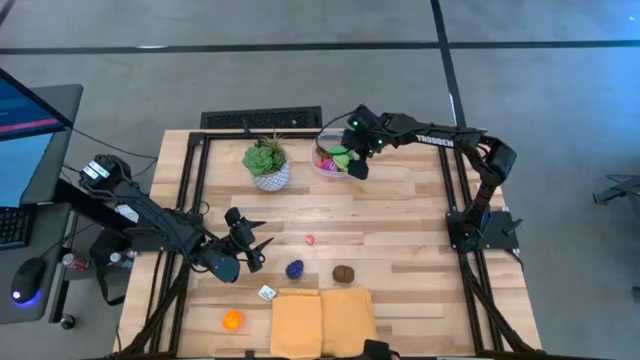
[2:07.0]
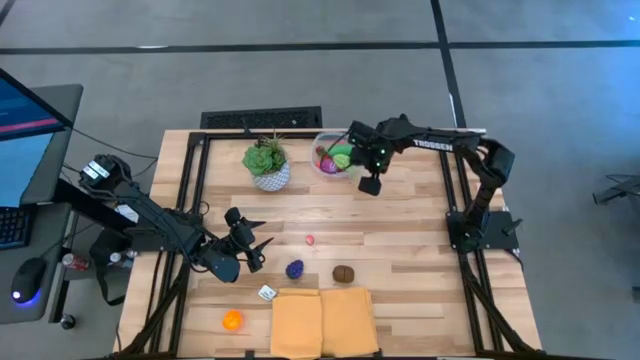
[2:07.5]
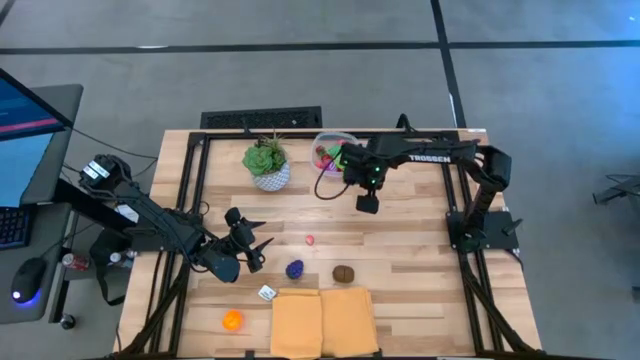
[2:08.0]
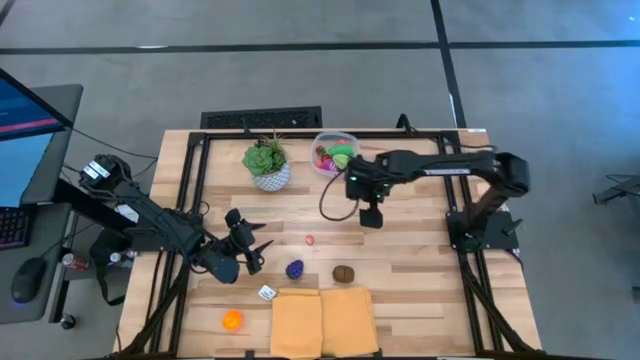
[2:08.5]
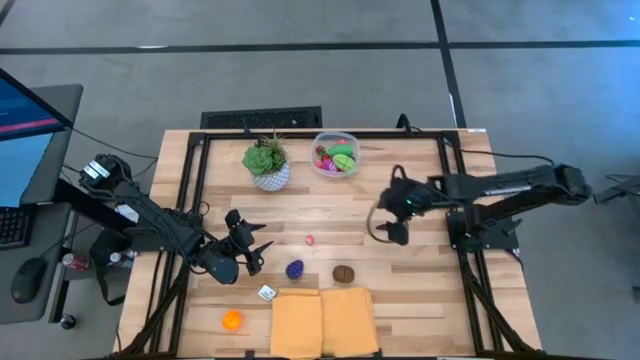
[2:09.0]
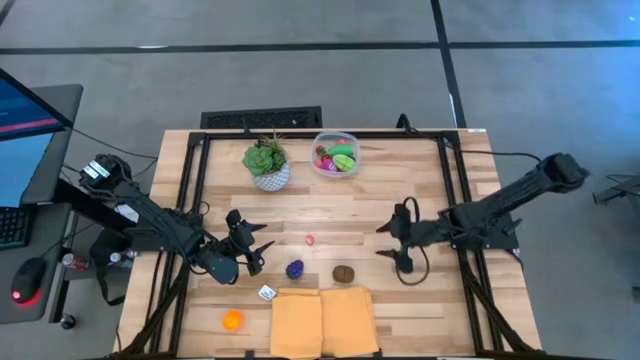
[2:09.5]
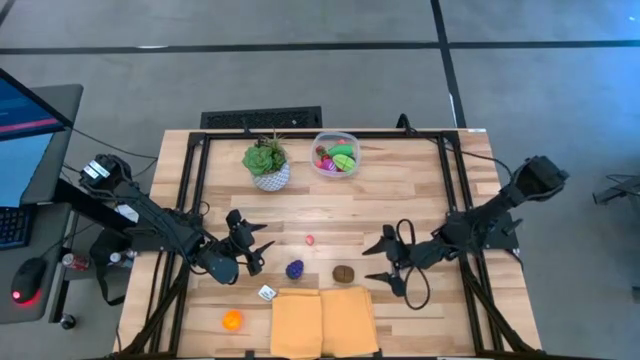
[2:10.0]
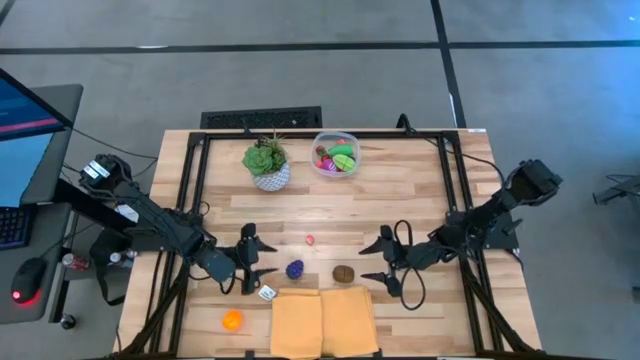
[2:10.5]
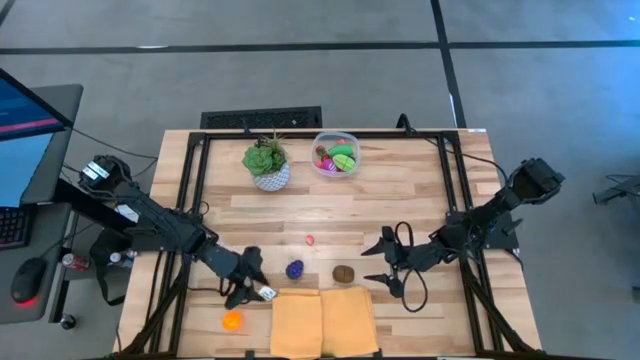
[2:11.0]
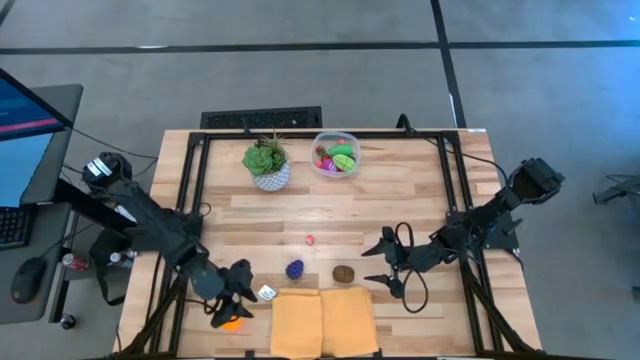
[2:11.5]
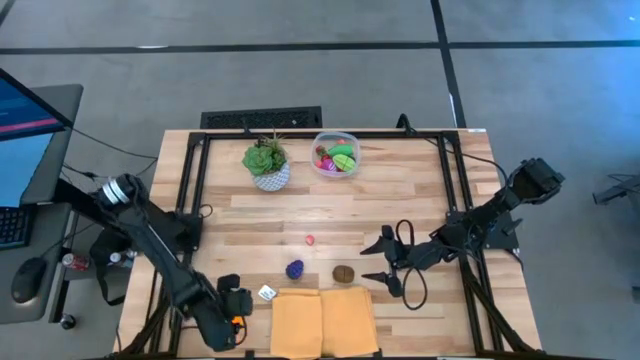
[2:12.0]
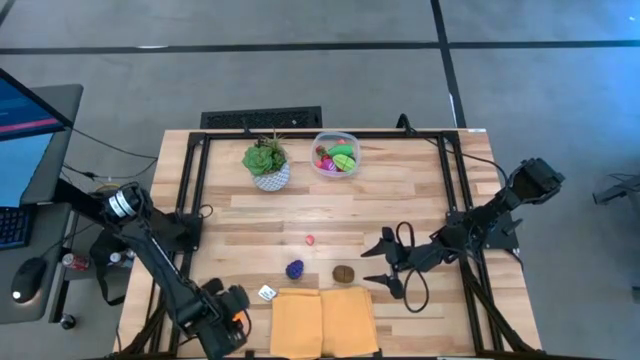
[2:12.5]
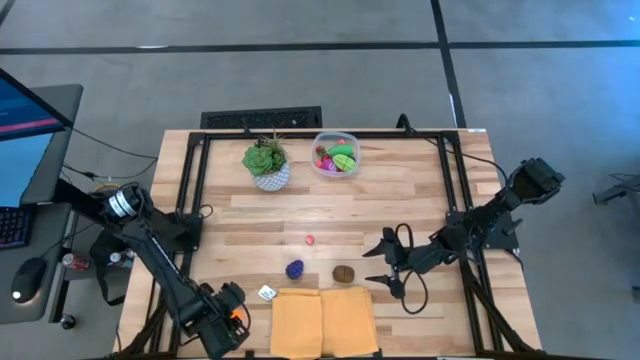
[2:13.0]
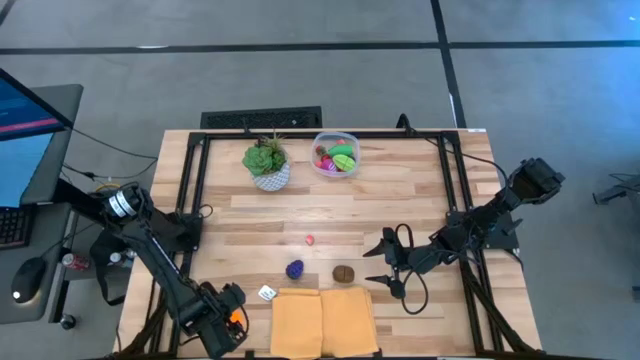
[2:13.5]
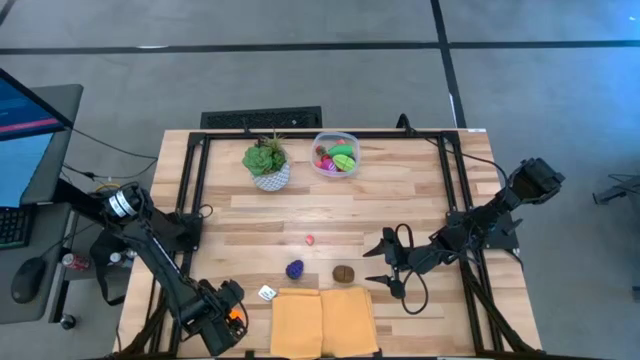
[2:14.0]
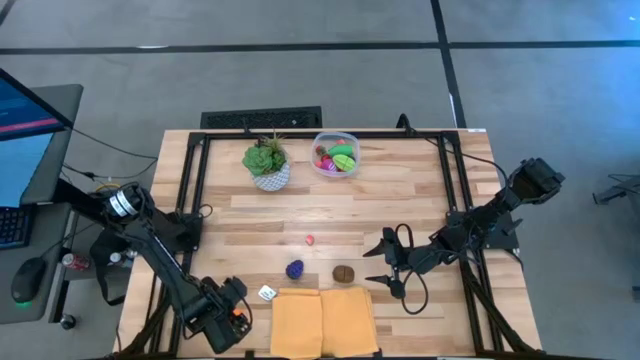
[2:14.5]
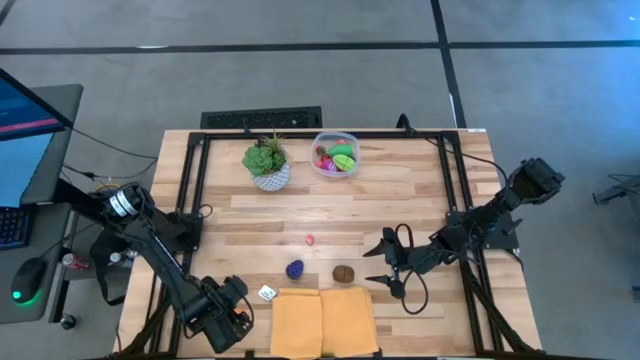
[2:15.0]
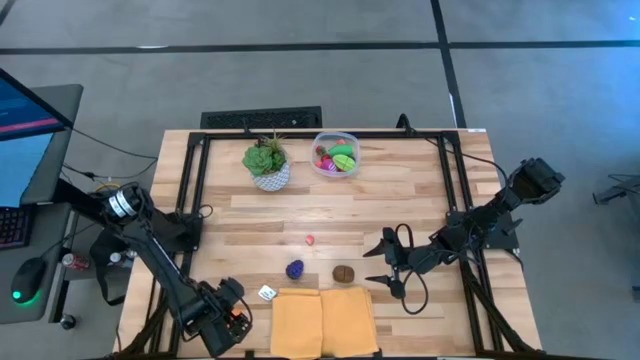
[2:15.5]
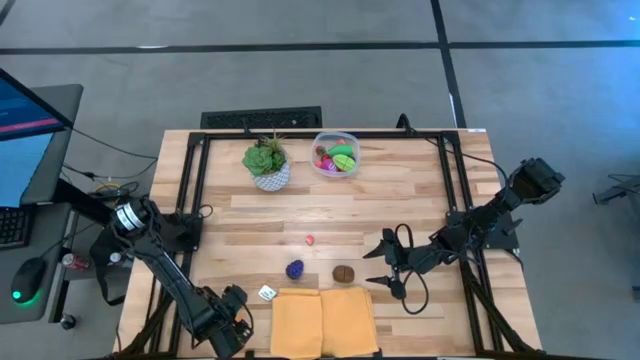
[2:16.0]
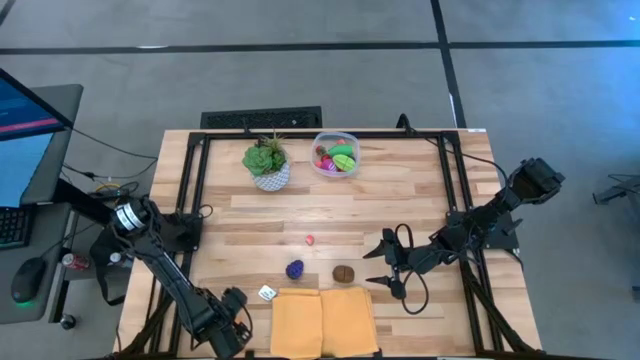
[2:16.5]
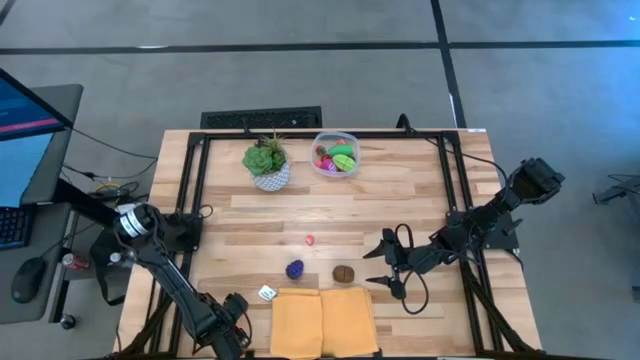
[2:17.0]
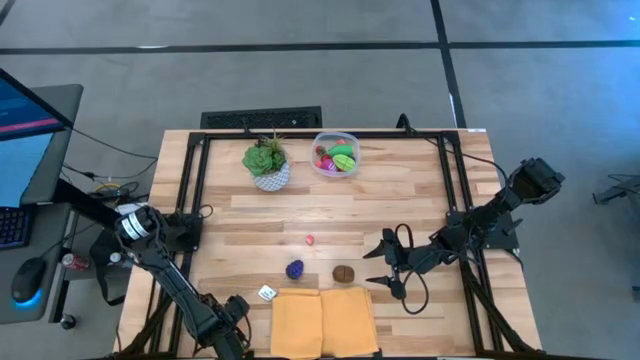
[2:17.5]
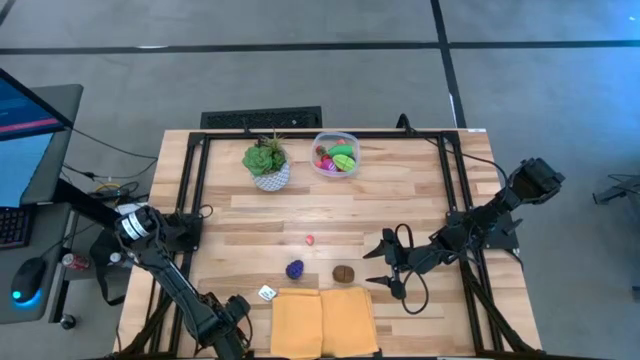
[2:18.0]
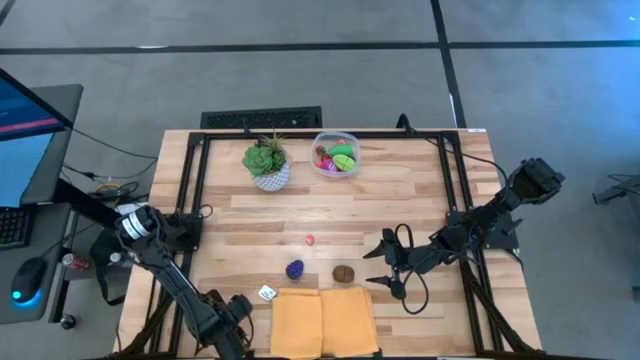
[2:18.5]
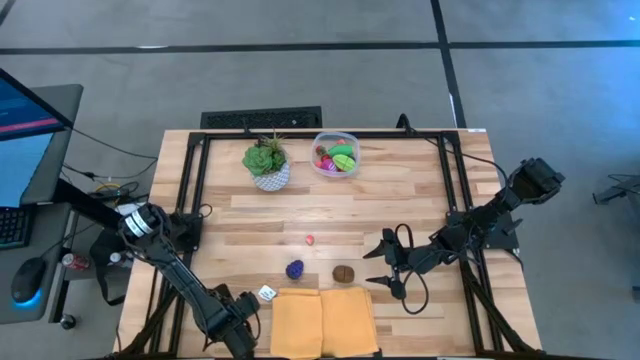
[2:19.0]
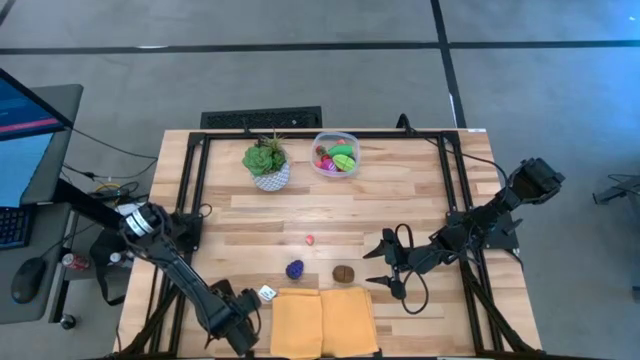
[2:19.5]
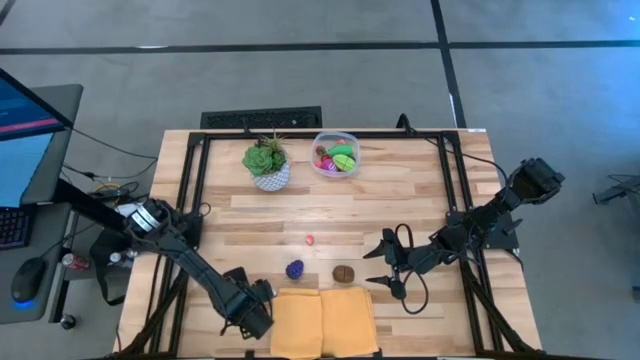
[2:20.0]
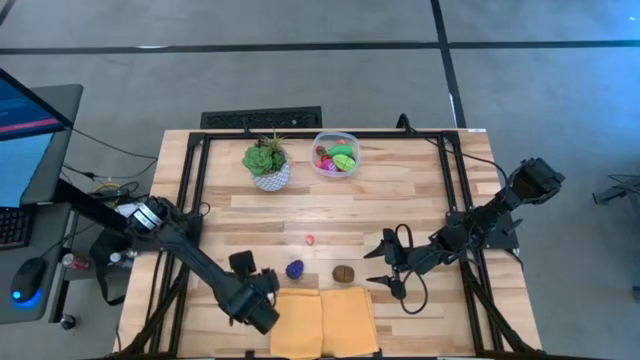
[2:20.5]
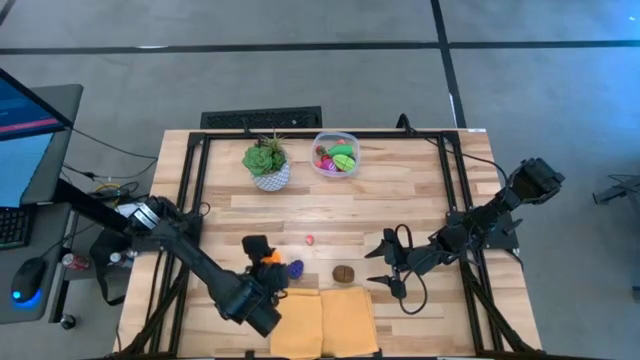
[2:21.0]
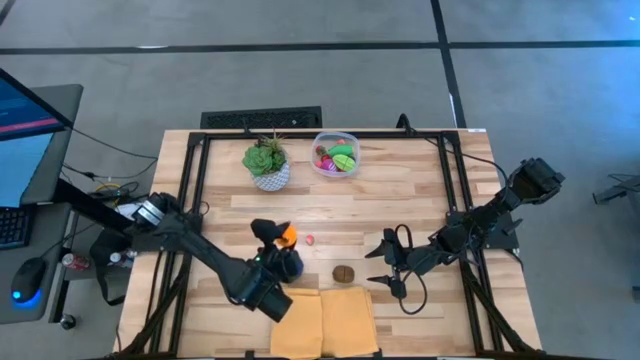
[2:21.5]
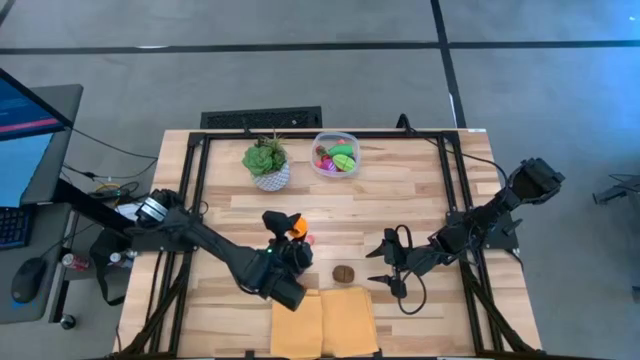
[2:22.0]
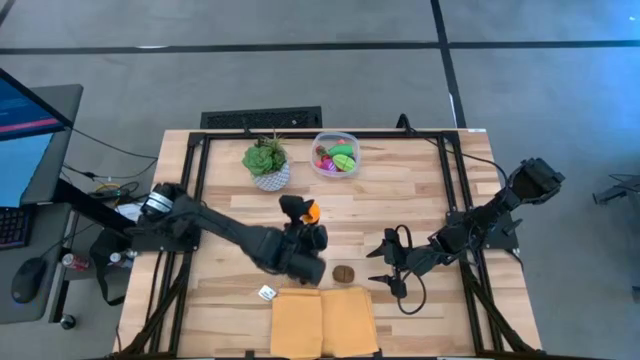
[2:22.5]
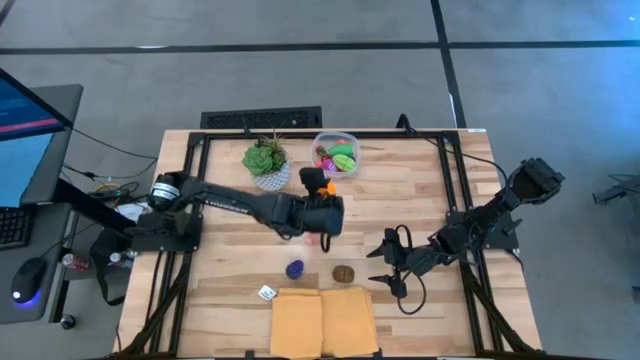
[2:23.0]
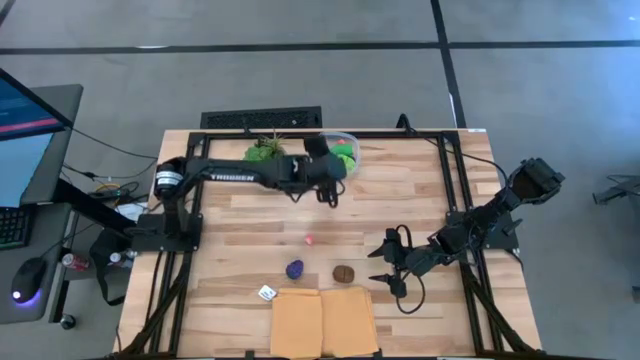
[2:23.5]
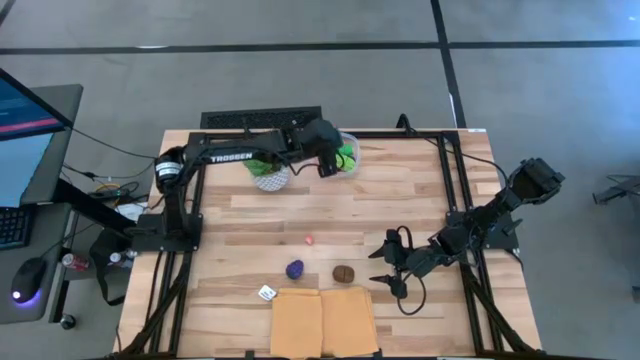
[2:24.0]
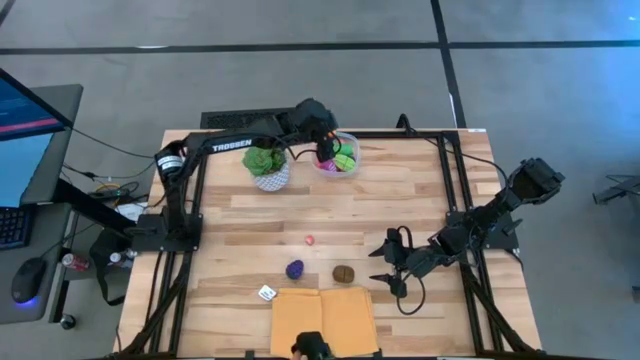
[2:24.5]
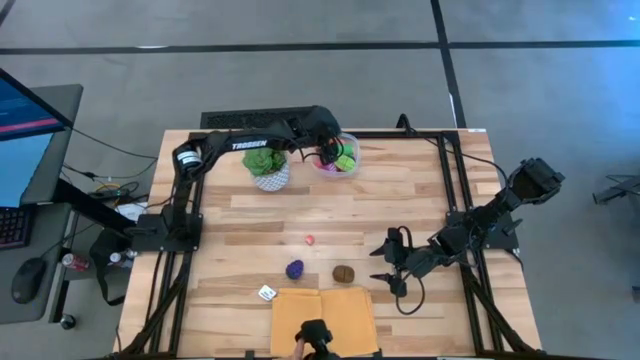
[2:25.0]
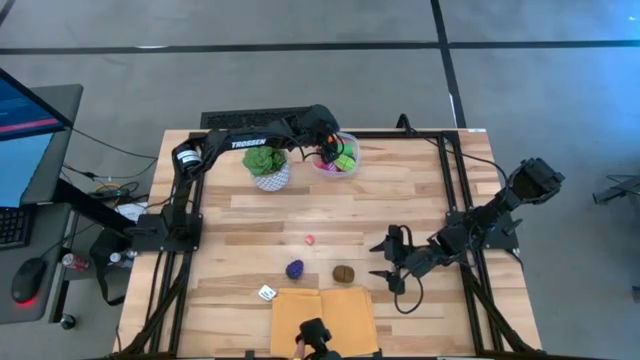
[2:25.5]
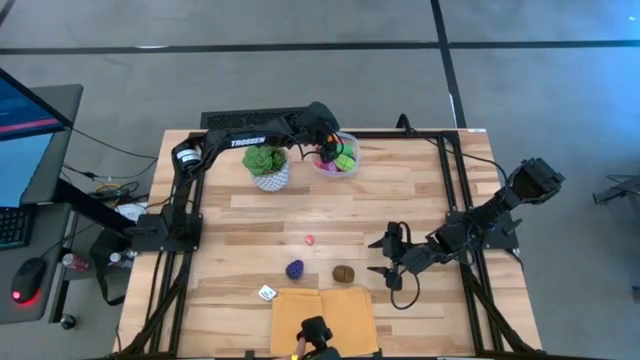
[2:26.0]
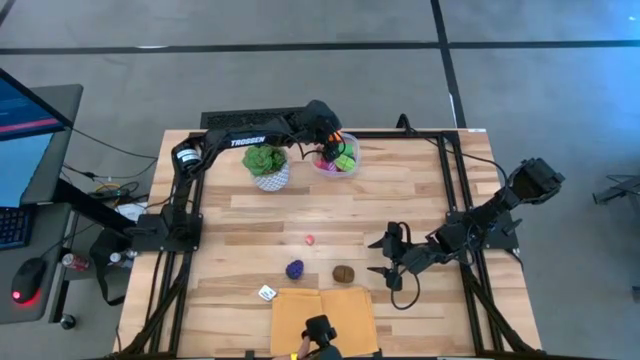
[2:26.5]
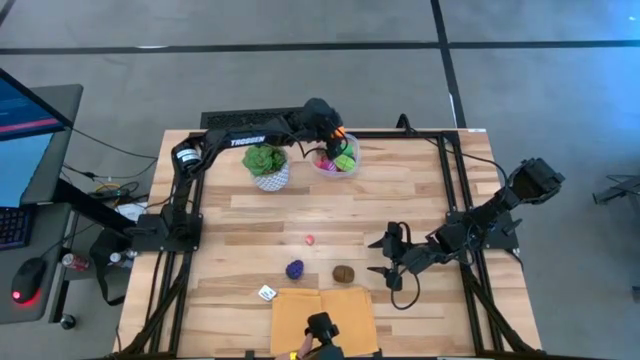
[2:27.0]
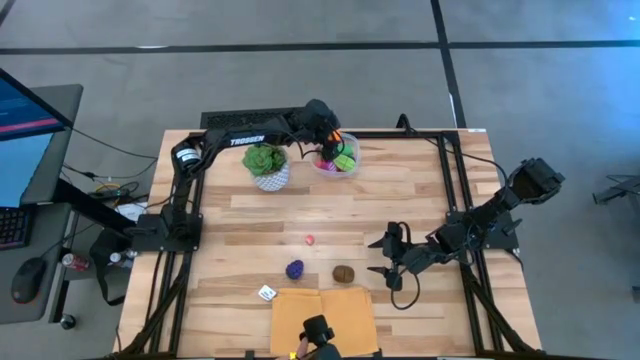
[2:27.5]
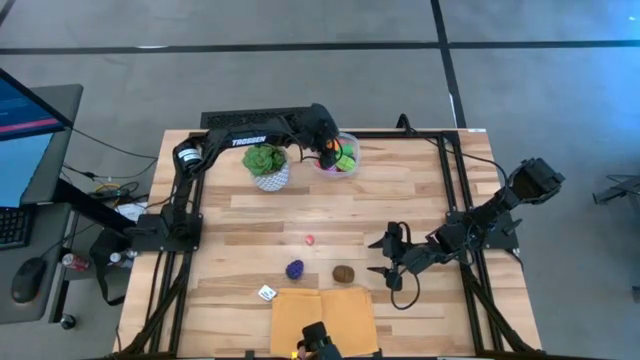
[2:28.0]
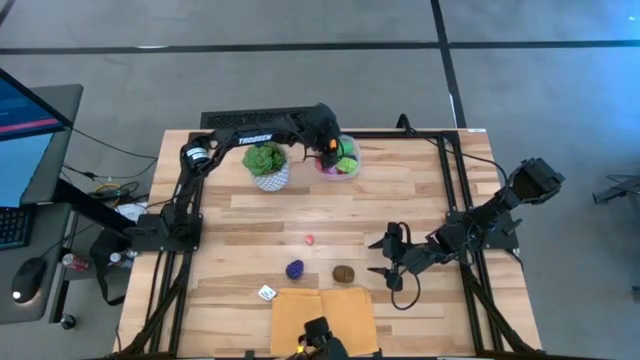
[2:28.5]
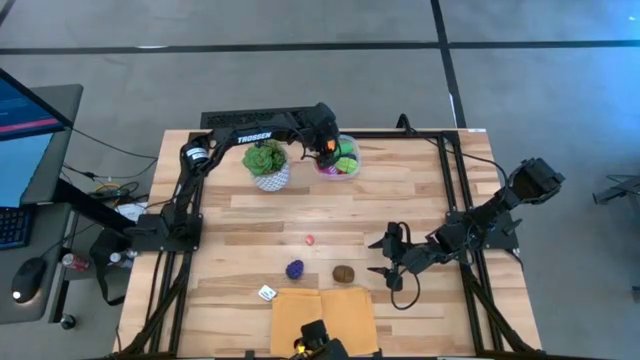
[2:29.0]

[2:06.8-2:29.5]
Task: Pick and placing Produce into tupperware
Put the orange into the transparent bin
